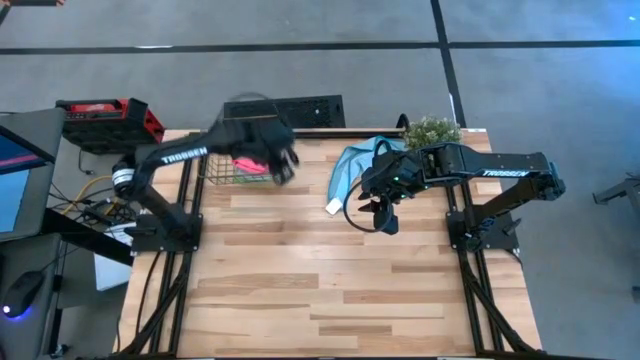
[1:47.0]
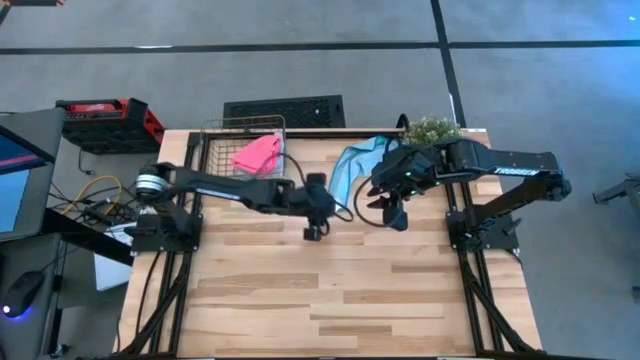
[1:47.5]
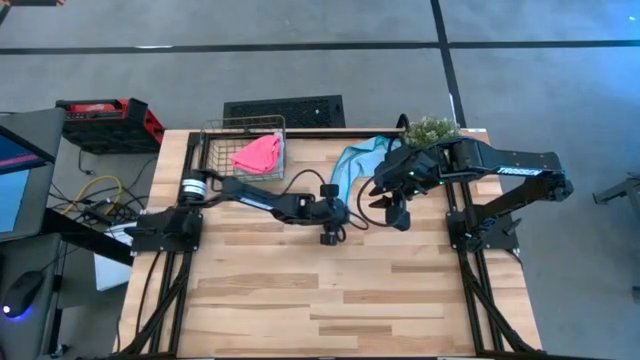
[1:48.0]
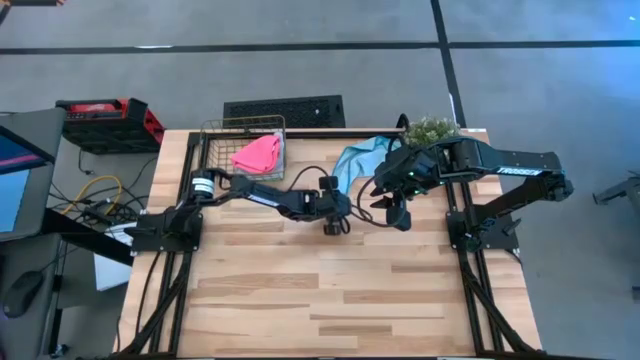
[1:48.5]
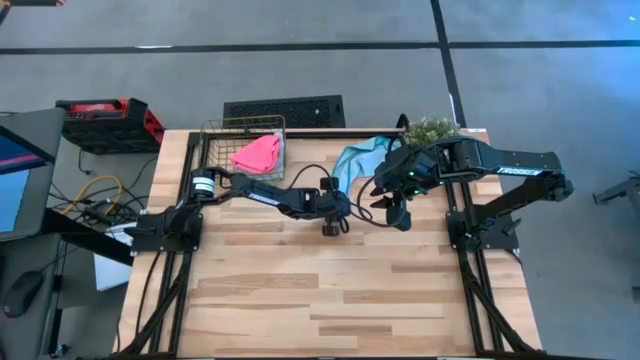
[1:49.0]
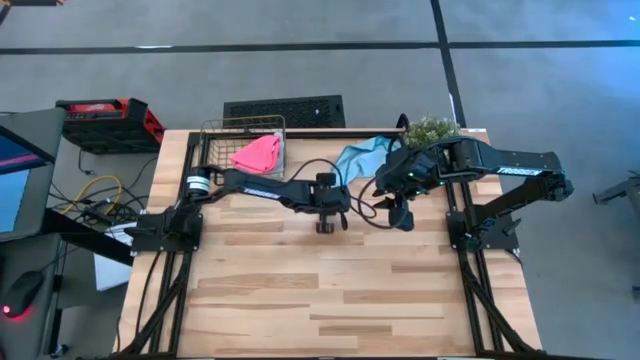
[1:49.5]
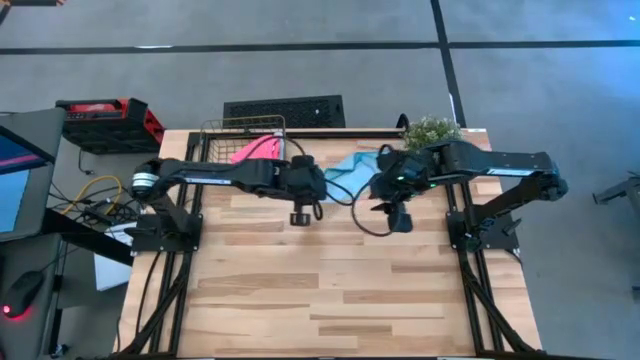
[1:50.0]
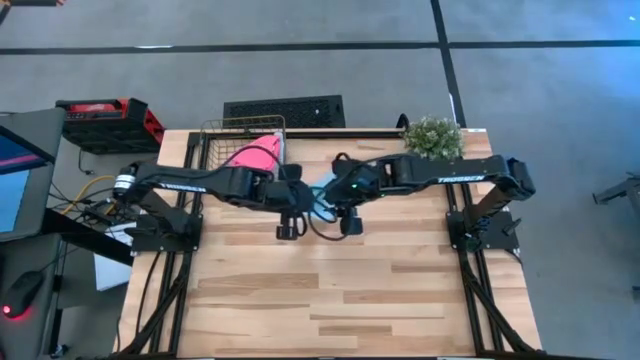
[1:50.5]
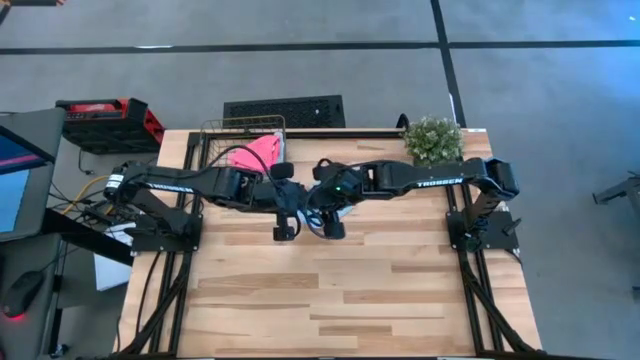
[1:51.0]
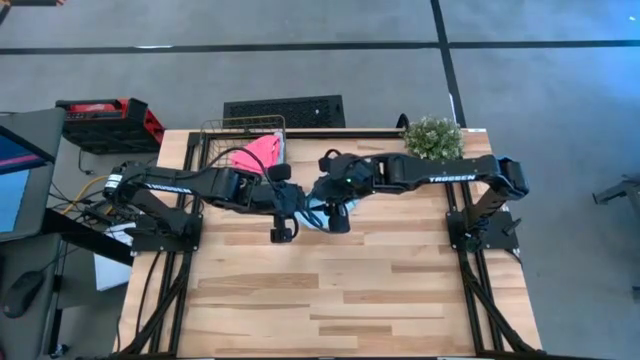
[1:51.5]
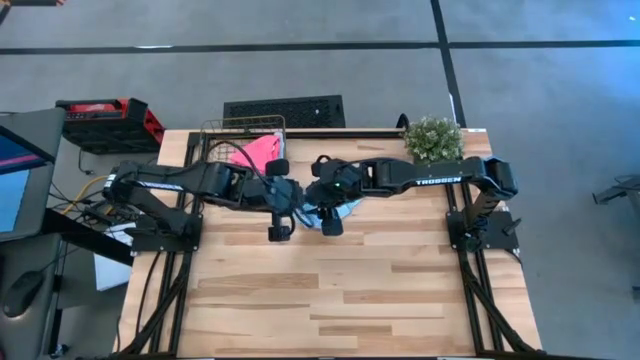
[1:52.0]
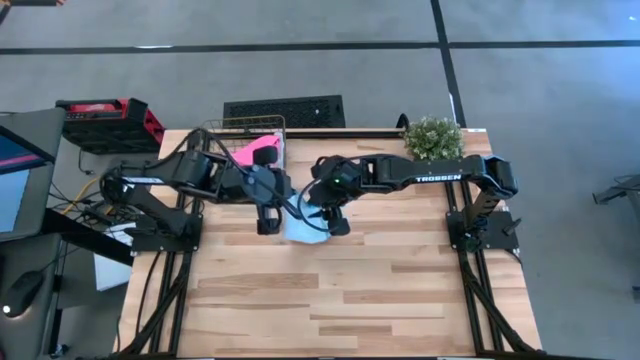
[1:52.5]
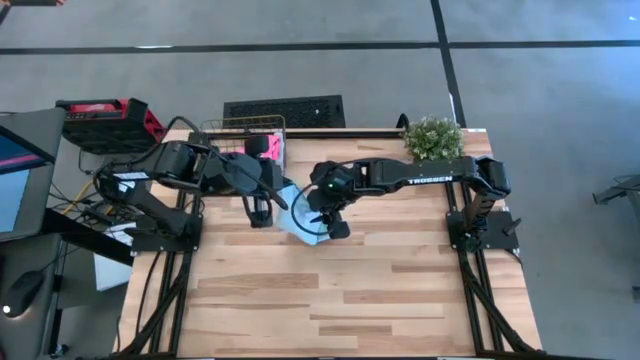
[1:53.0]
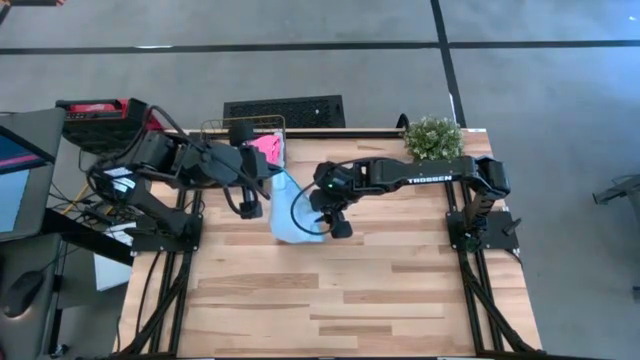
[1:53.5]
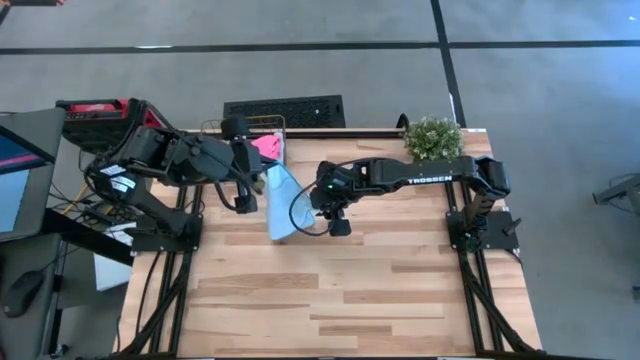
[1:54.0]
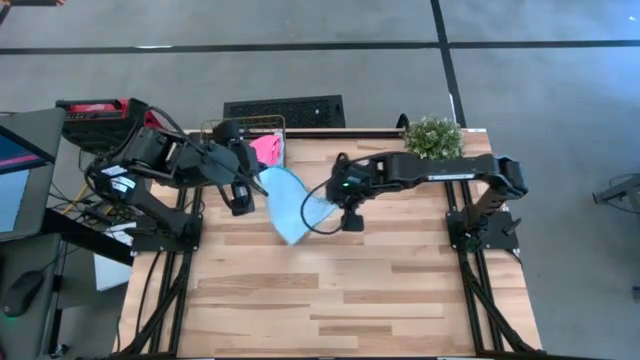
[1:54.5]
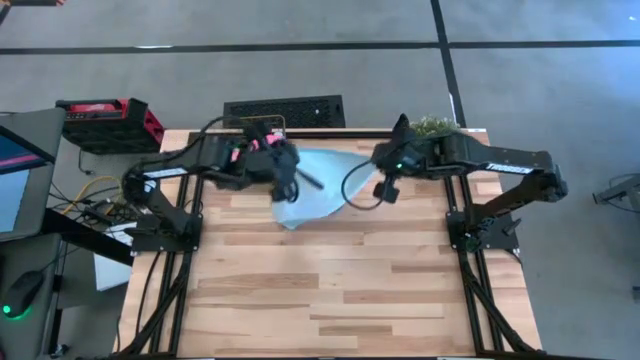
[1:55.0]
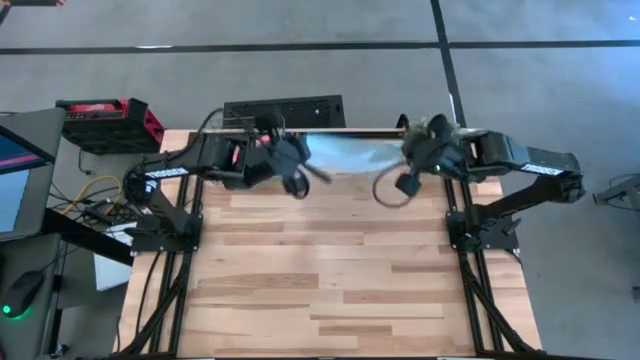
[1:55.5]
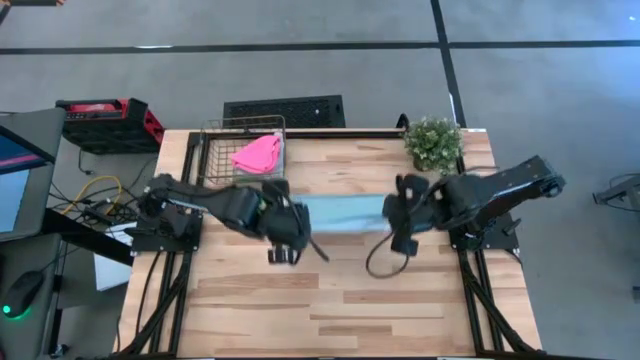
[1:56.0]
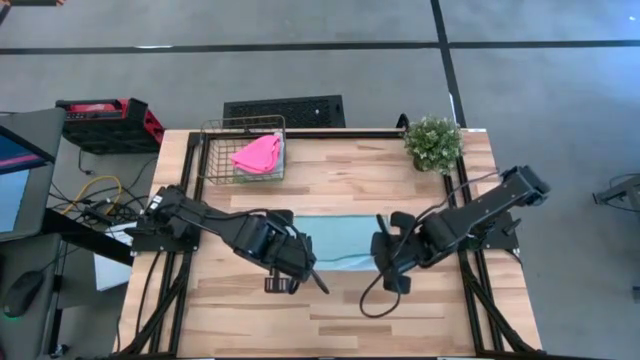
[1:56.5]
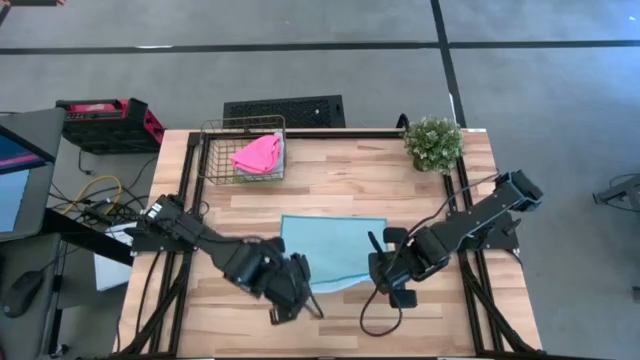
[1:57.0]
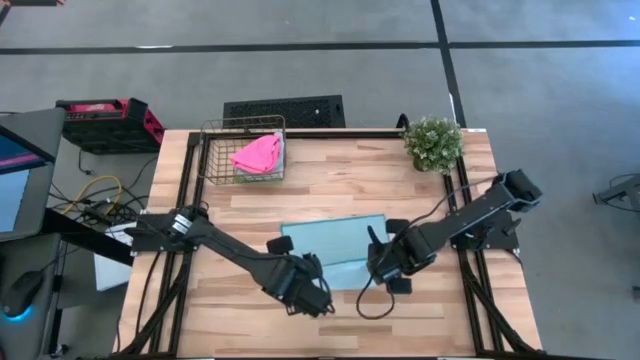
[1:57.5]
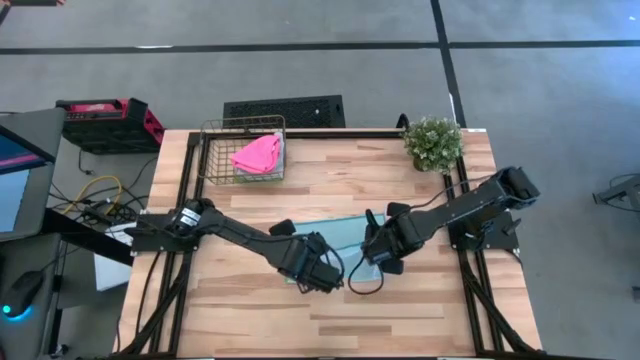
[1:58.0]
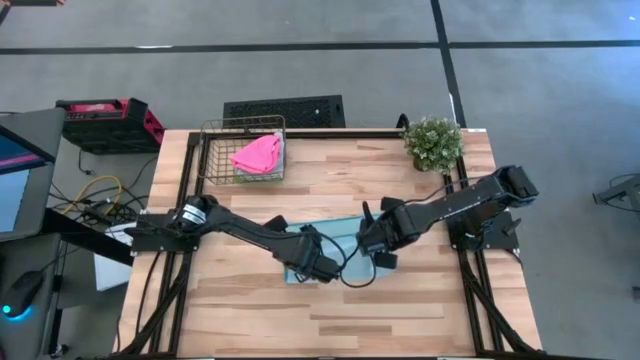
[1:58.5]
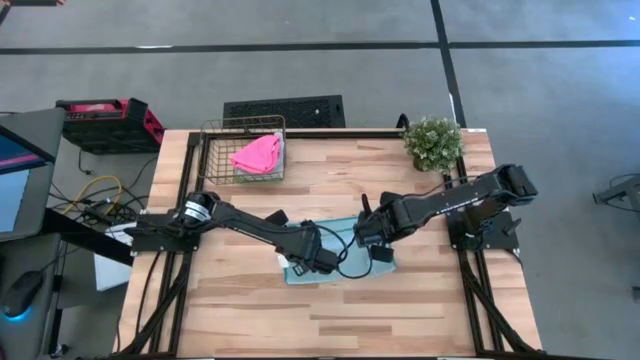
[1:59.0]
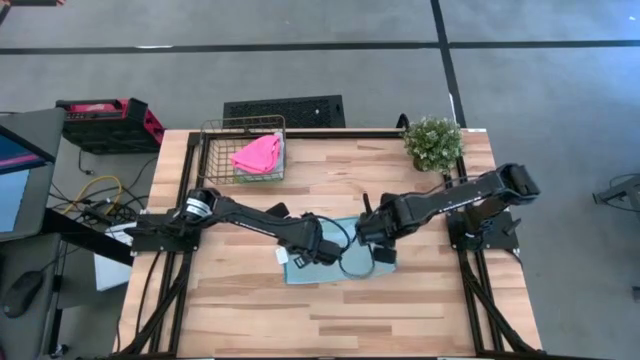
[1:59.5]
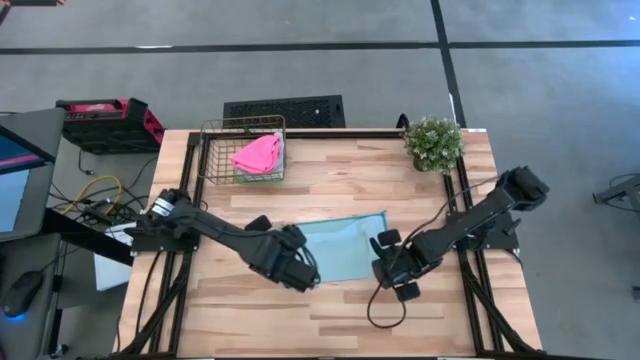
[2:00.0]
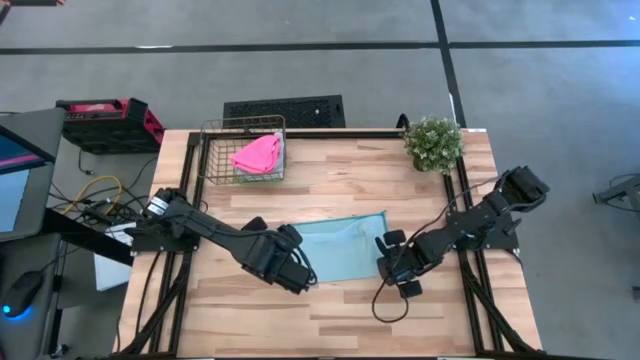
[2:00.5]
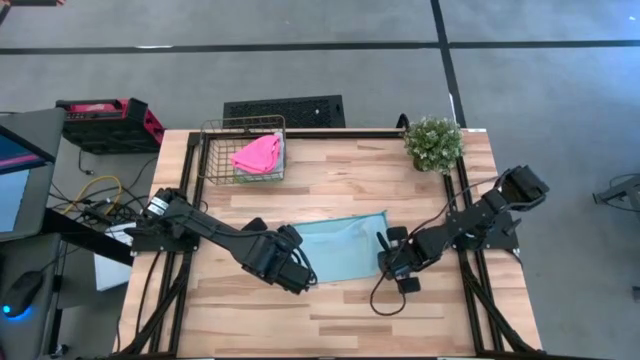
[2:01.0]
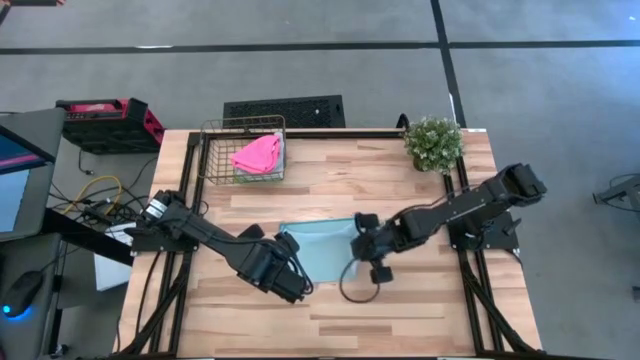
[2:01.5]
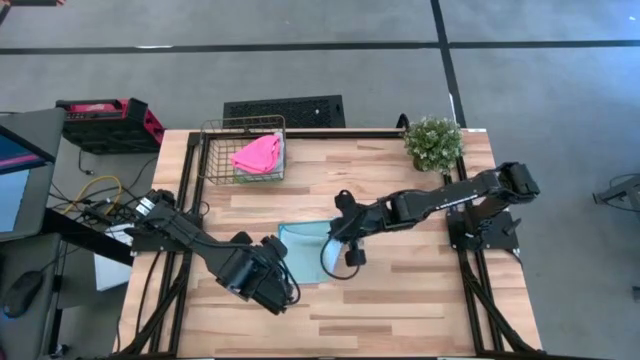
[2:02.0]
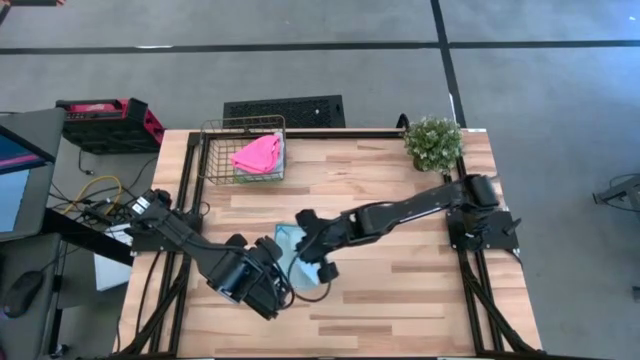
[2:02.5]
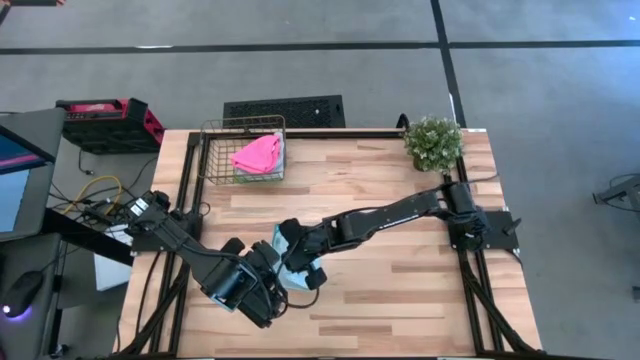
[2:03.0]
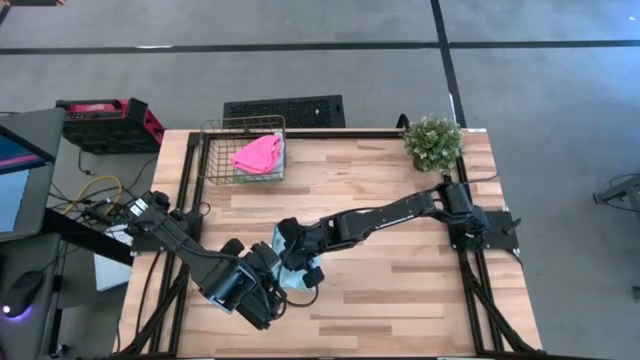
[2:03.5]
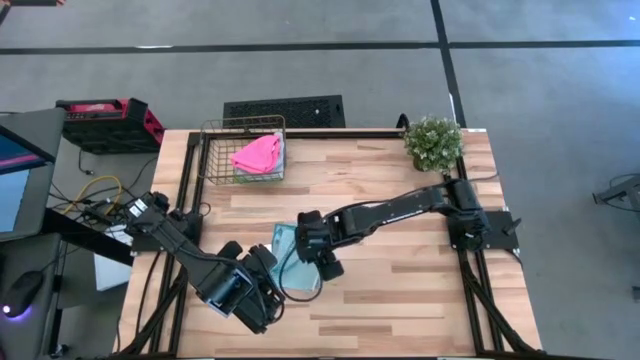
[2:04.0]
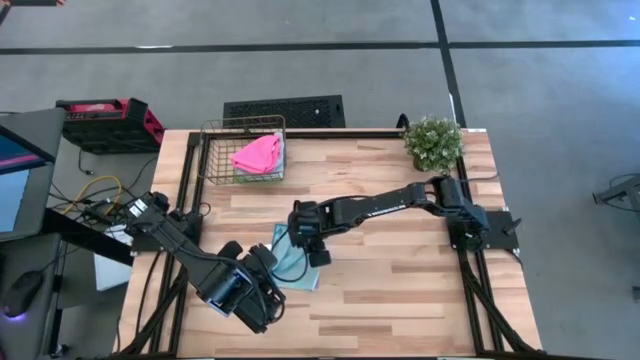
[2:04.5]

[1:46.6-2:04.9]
Task: Fold microfiber towels
Fold the blue microfiber cloth

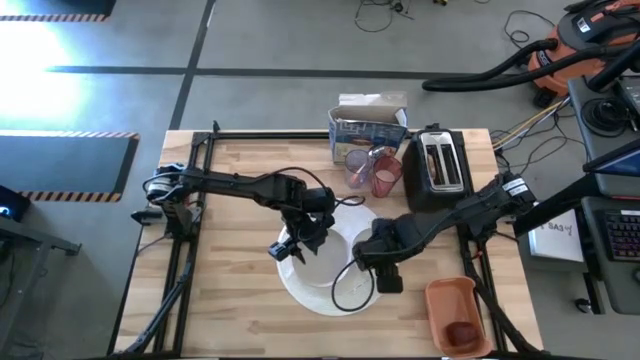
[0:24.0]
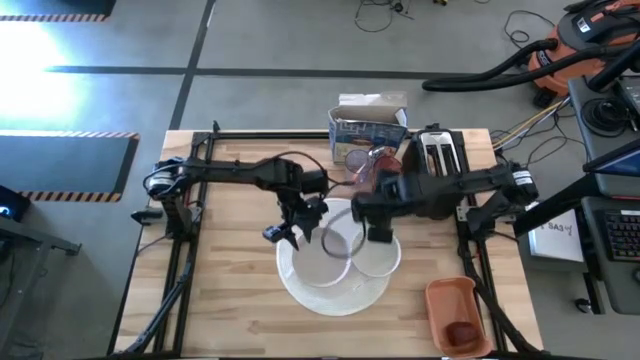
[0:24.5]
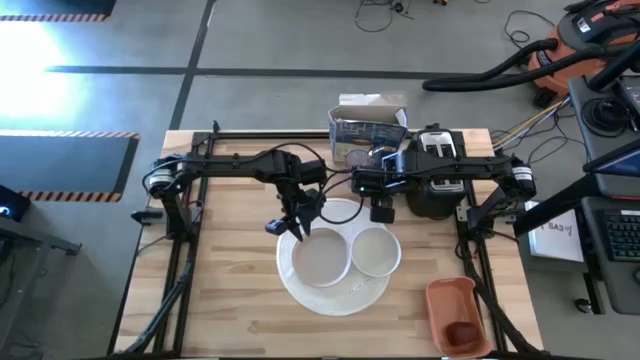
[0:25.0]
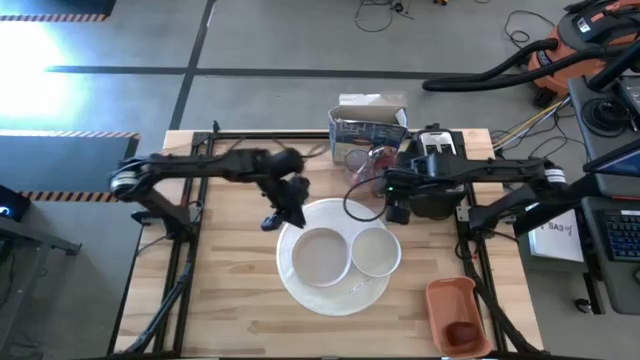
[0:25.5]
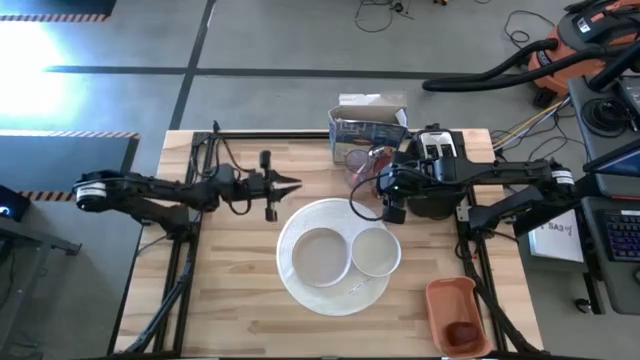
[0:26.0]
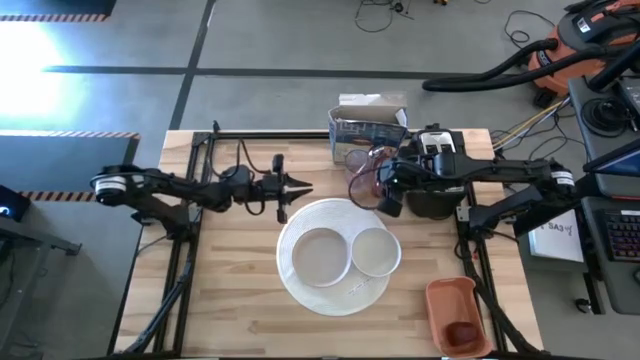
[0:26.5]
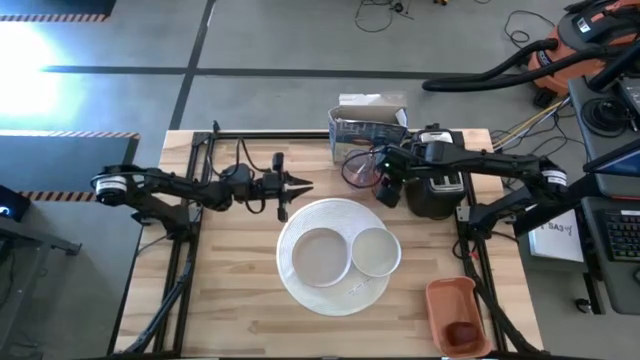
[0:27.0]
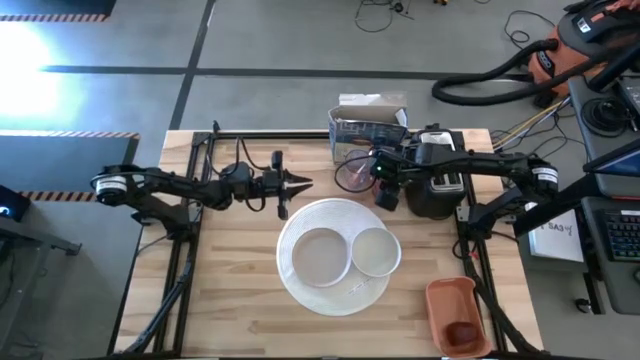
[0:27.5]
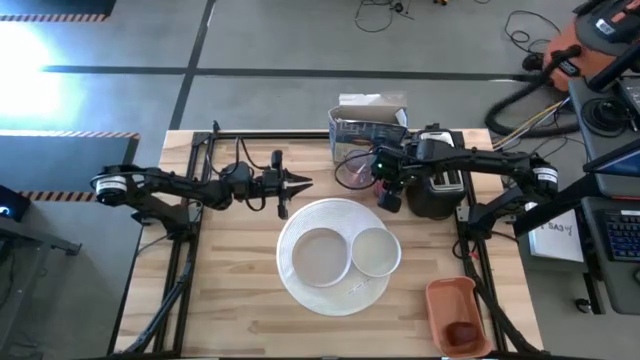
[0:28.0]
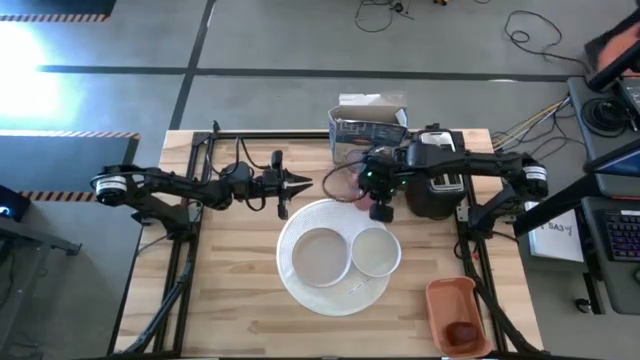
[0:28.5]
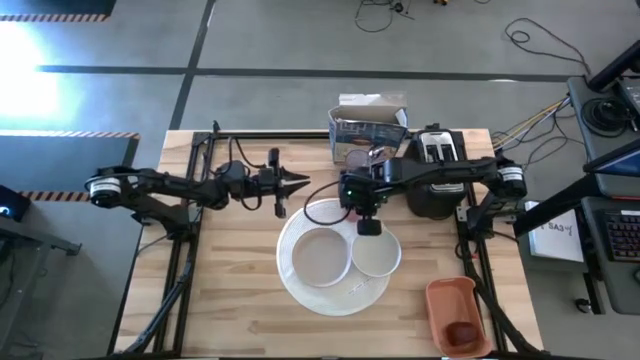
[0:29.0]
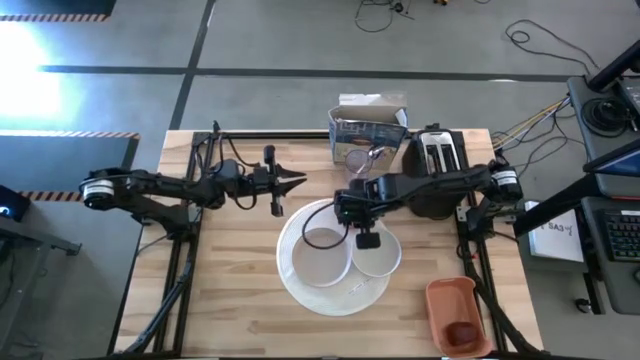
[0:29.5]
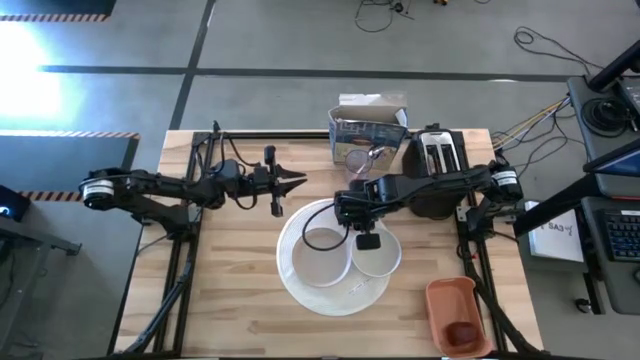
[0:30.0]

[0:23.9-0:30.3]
Task: Arrange a breakfast setting
Put the cup of milk on the white placemat to the top left of the white bowl
